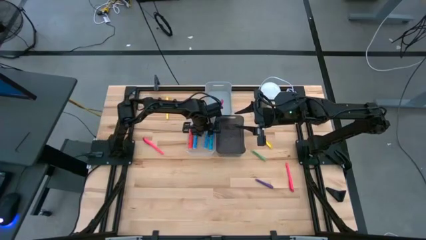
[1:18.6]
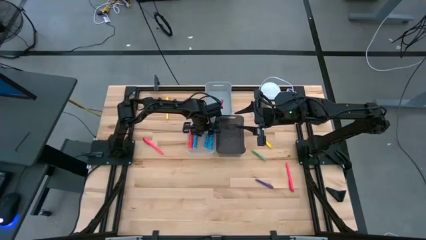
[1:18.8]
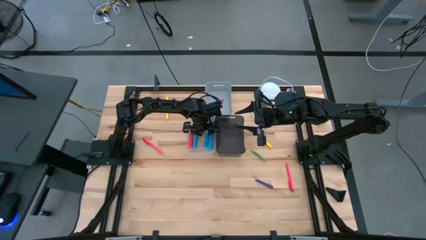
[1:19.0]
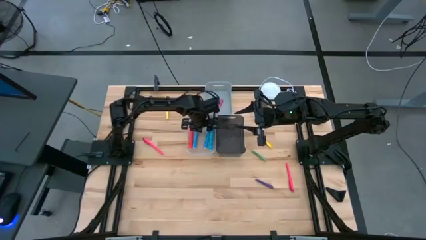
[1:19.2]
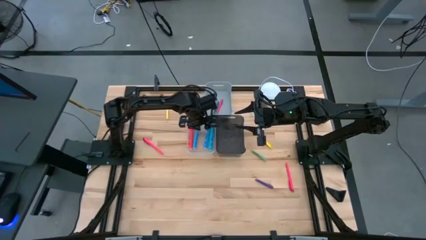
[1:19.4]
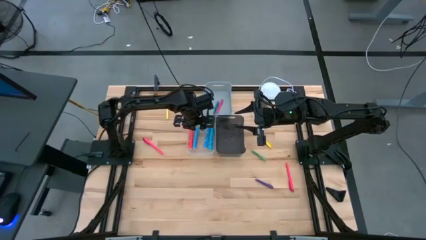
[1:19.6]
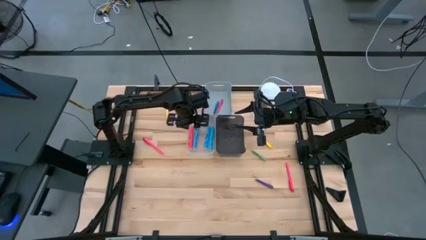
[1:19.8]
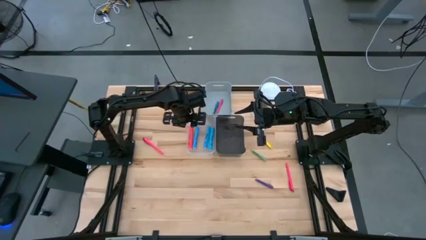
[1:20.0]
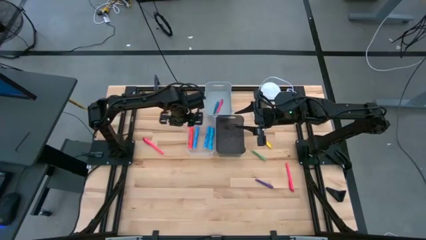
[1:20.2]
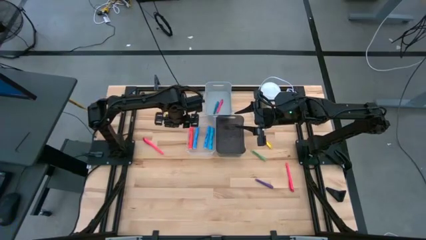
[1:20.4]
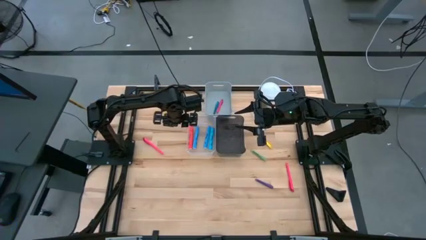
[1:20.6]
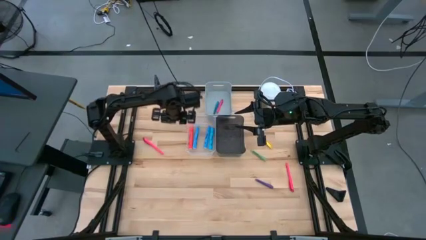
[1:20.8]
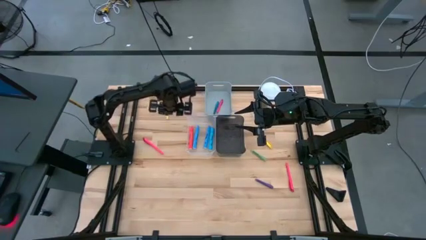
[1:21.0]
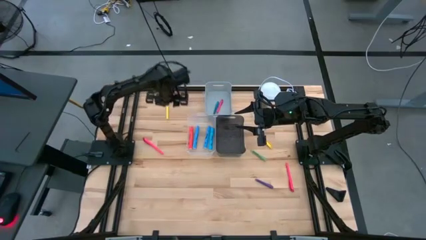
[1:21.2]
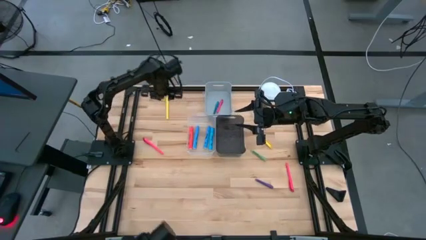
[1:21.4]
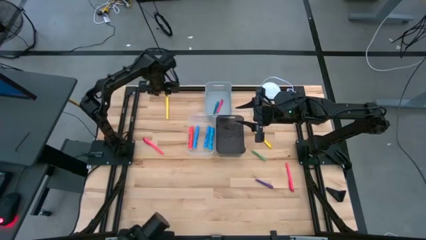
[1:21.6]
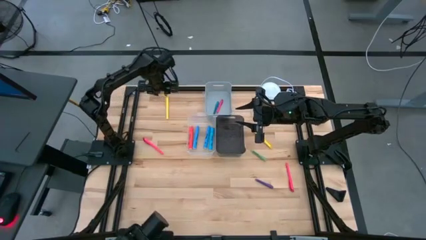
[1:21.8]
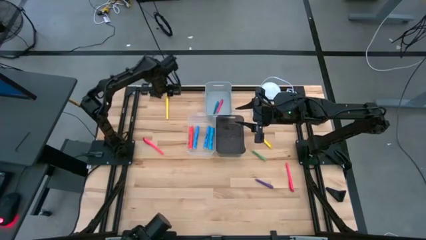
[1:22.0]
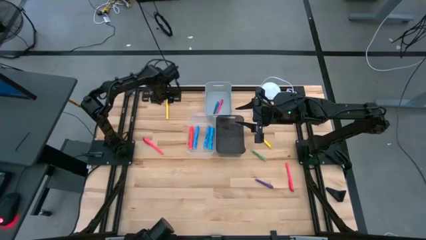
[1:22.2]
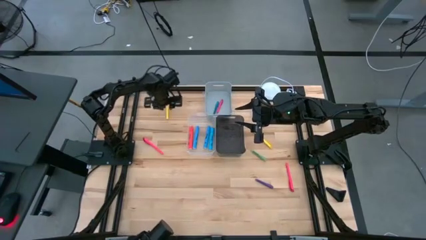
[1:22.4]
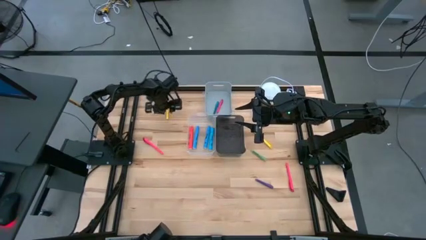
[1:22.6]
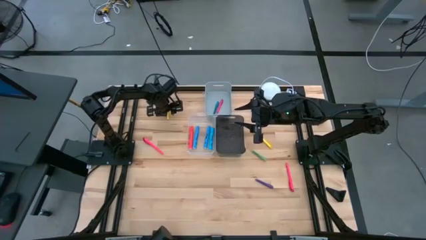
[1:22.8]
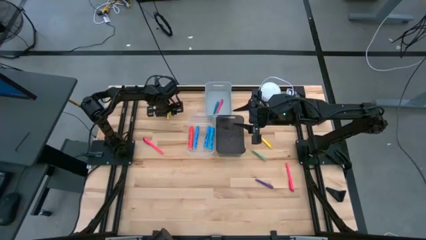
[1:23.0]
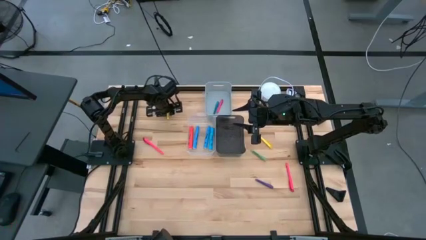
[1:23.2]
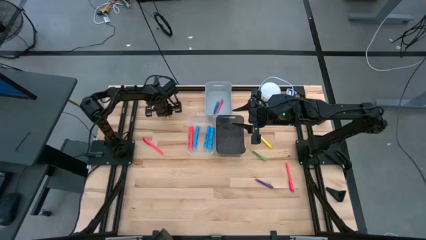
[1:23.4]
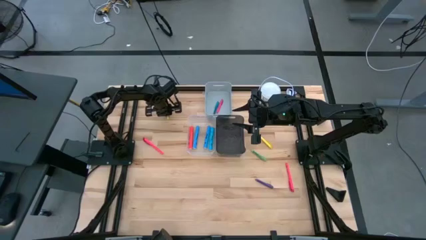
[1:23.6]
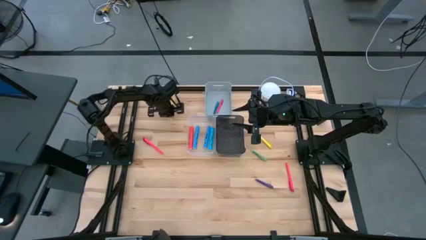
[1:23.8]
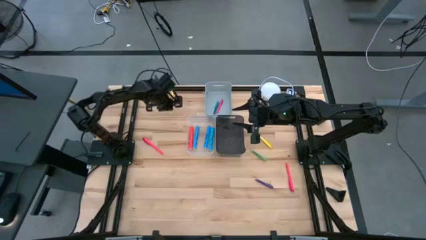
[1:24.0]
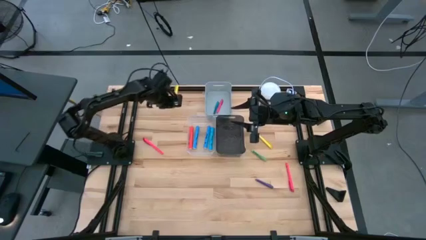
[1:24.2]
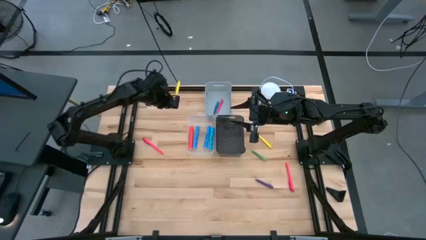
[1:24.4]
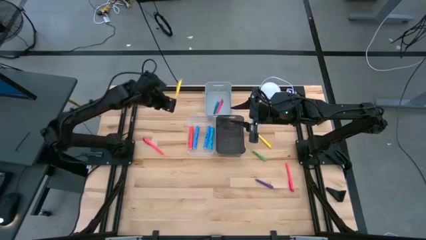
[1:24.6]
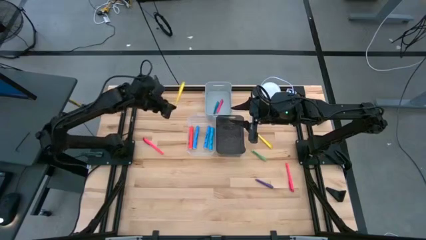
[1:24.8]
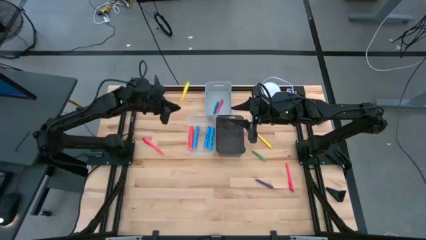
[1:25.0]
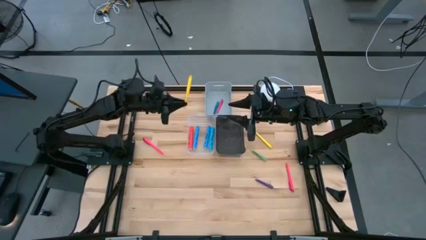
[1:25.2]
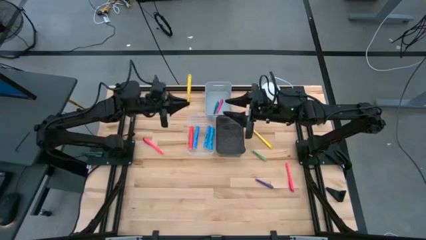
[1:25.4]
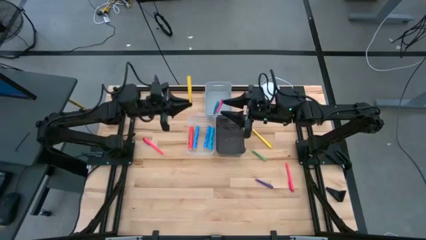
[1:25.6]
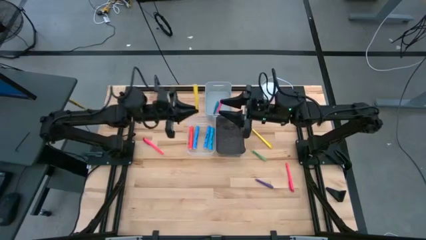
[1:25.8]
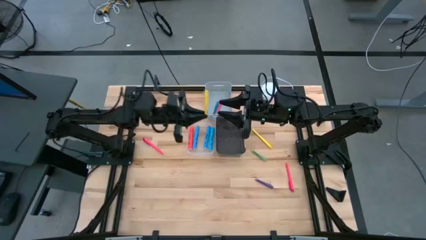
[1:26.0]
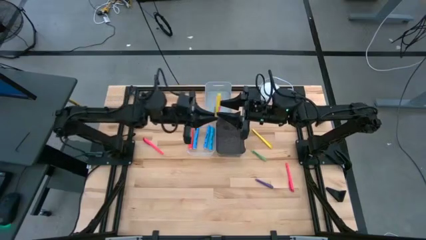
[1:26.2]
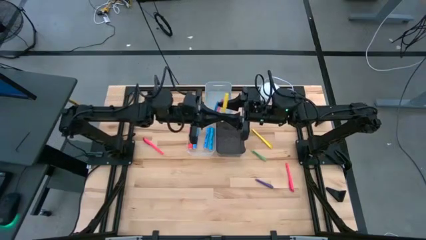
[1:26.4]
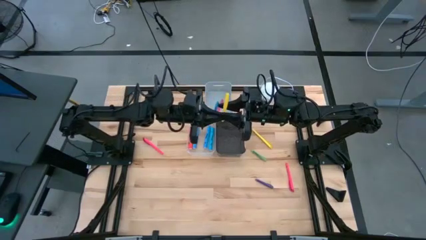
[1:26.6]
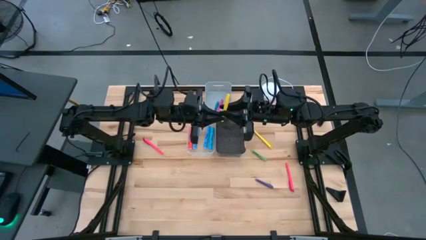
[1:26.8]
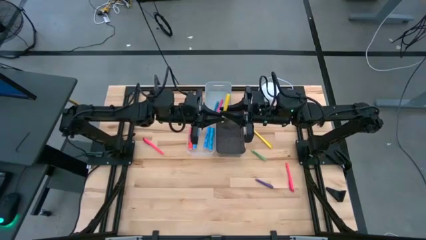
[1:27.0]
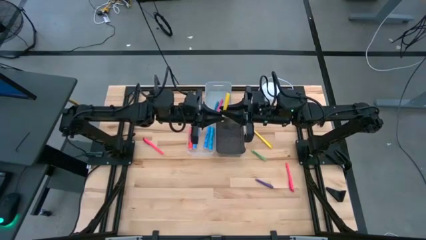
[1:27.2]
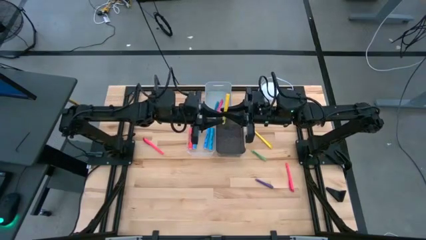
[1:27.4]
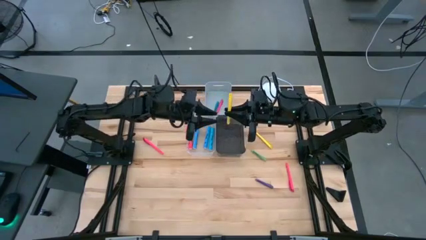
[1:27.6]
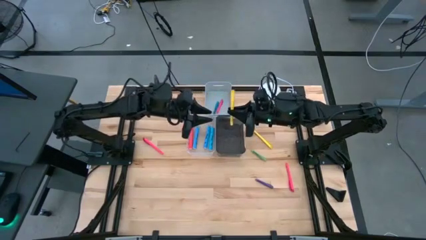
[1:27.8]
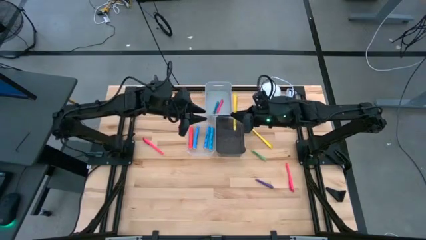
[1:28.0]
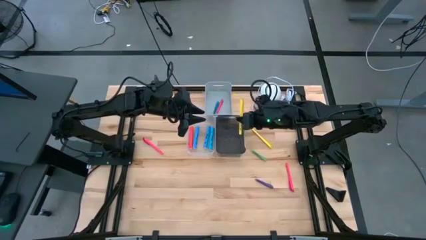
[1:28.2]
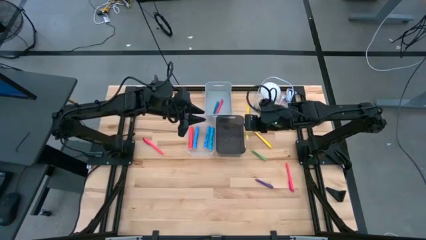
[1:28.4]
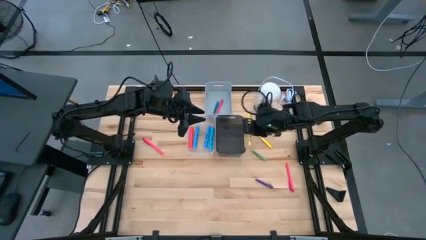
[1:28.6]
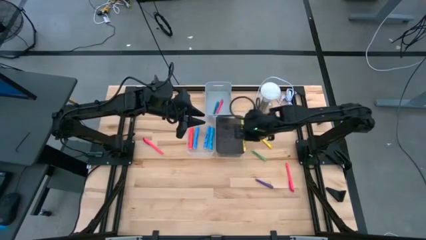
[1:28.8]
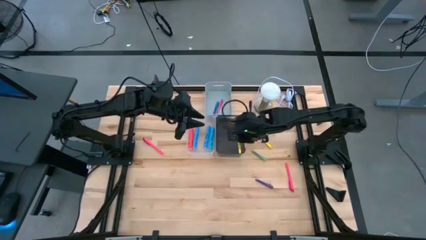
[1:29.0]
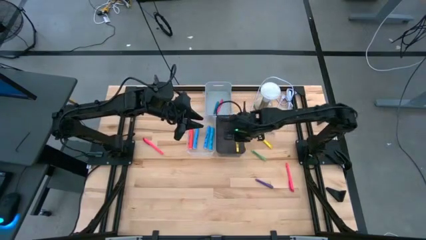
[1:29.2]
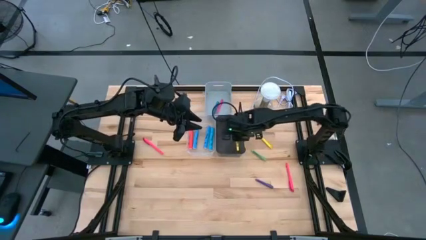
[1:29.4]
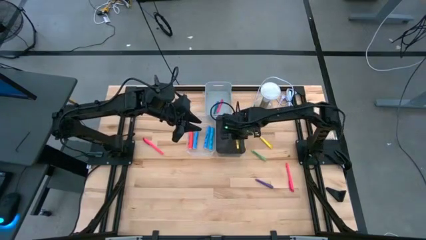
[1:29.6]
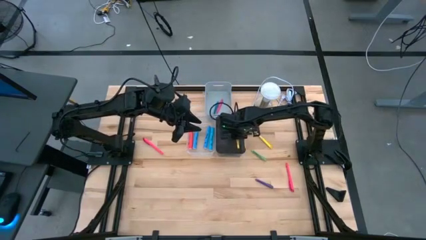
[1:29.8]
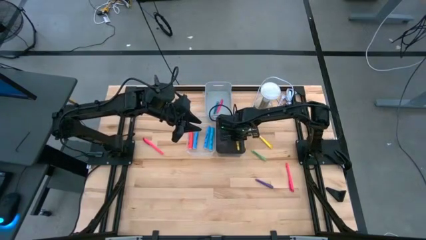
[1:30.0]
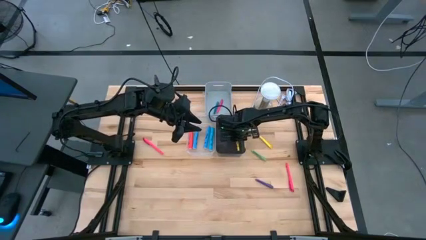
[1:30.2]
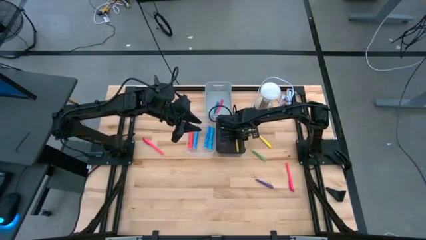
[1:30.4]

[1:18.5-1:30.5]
Task: Pick & Place Markers
Put the top yellow marker pen into the black bin
